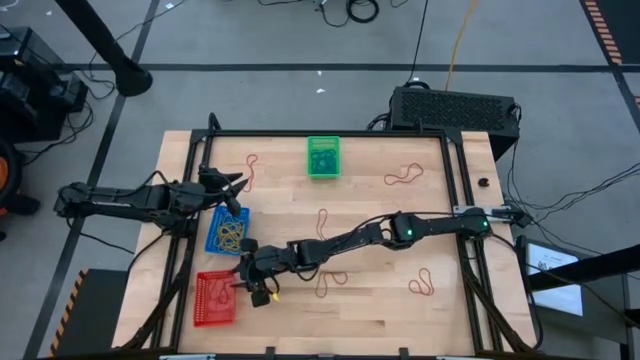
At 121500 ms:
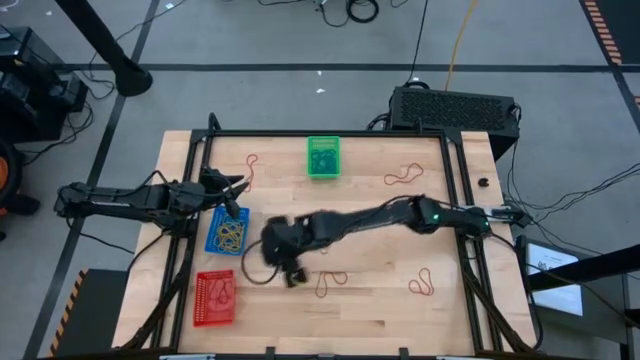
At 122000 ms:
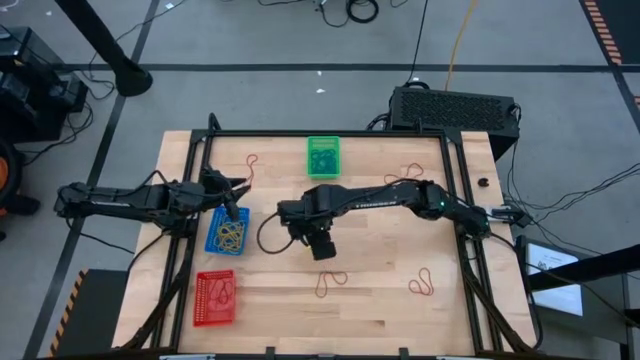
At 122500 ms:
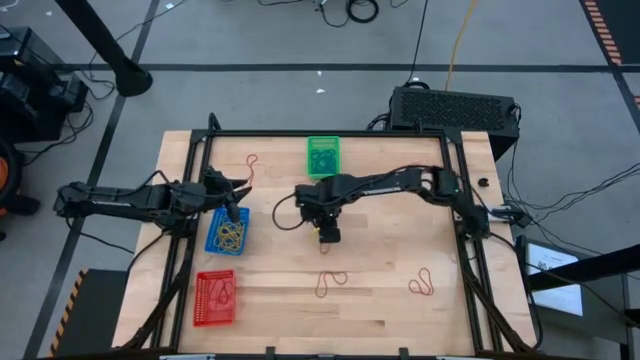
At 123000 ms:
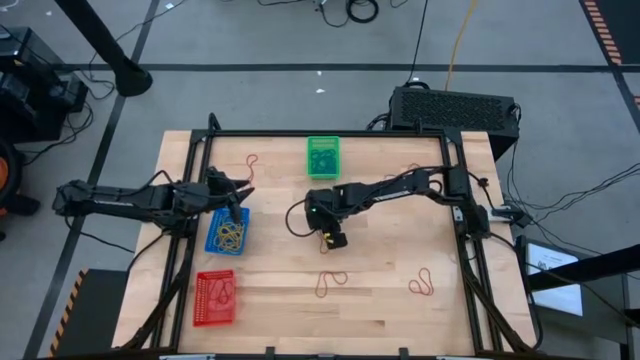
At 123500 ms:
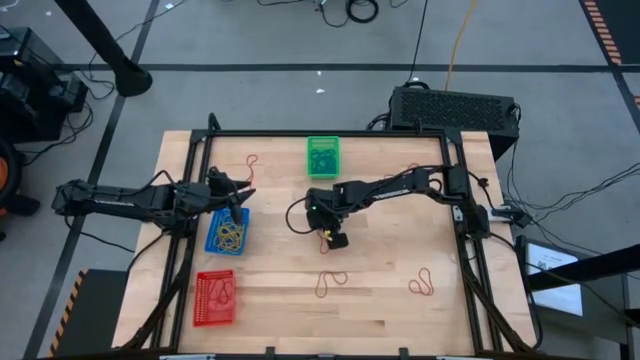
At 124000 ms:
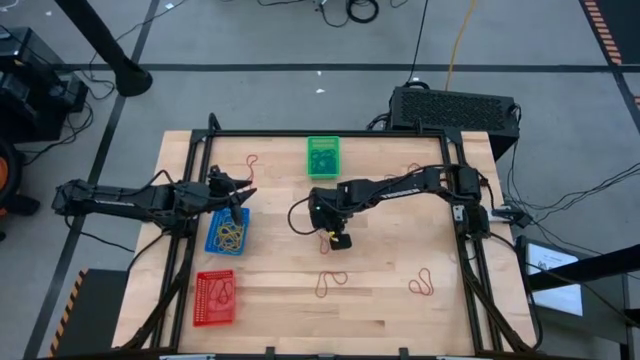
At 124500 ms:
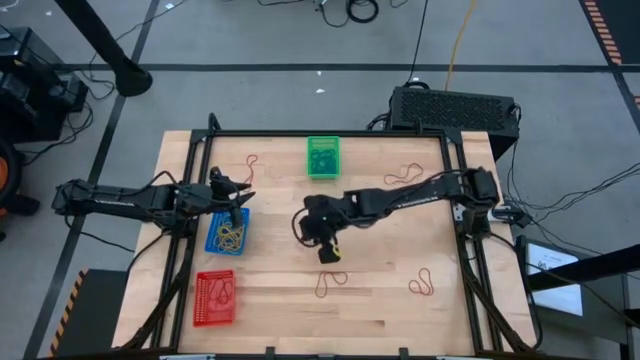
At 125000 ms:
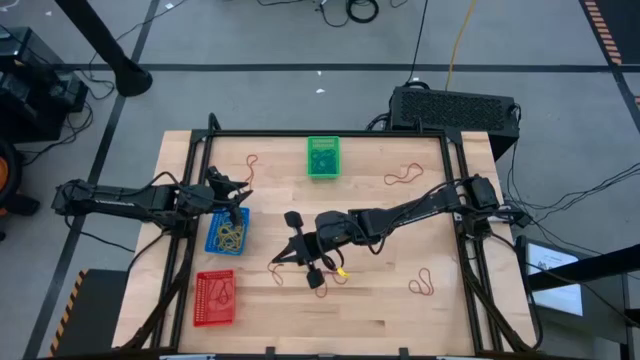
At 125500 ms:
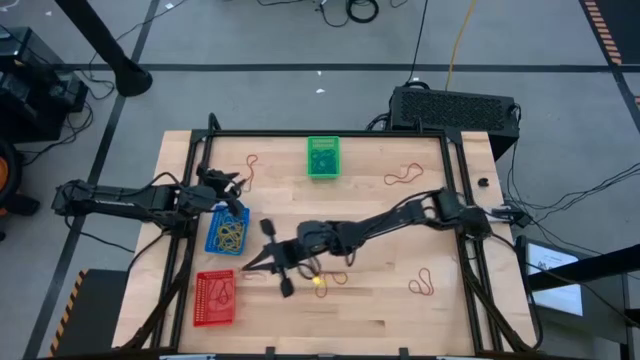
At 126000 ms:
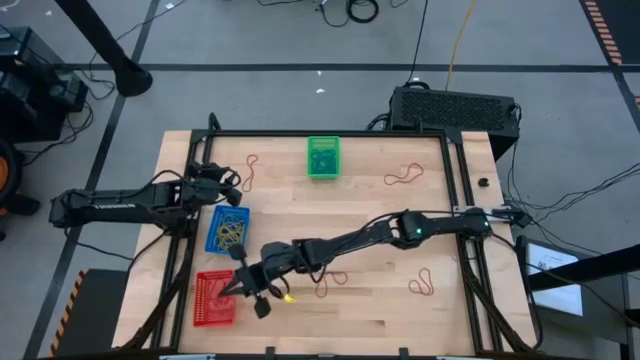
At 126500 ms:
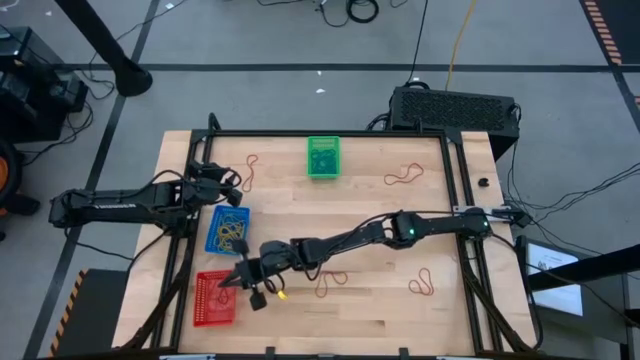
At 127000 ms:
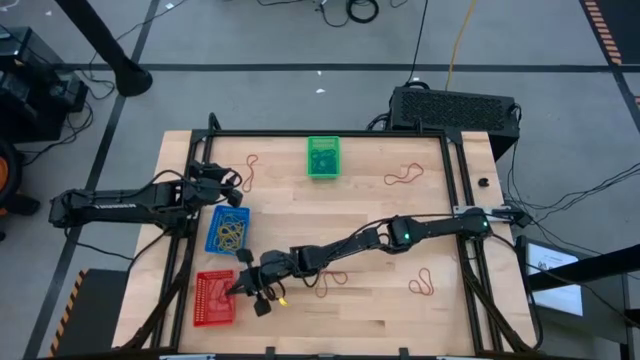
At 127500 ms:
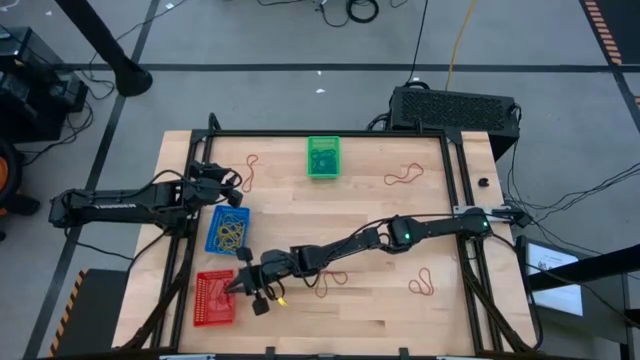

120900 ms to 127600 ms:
Task: Sort rubber bands into baskets
Put the red rubber band into the red bin

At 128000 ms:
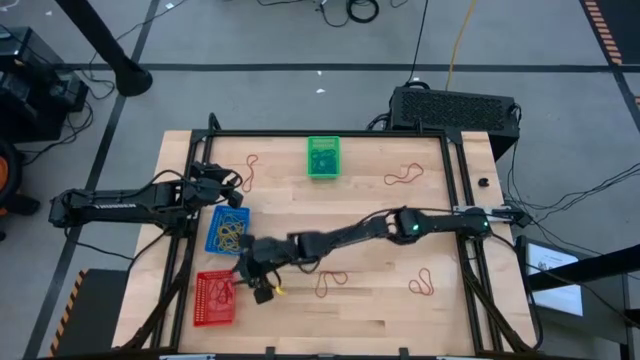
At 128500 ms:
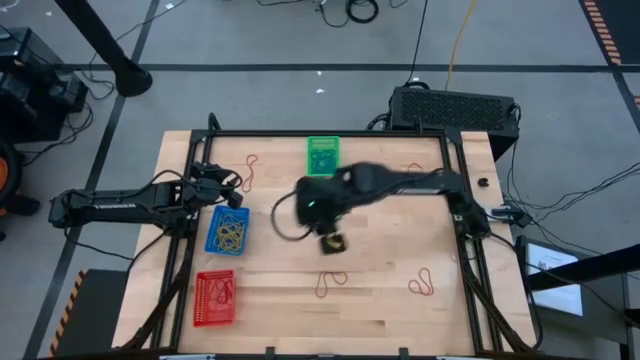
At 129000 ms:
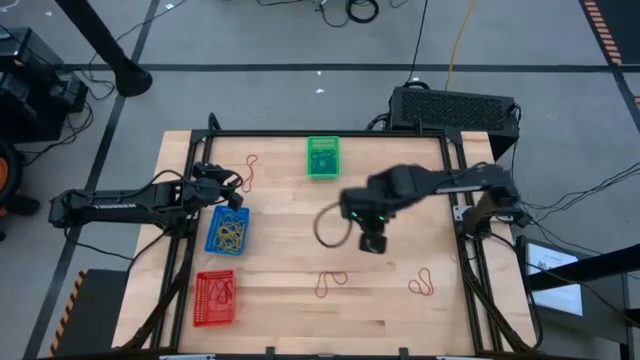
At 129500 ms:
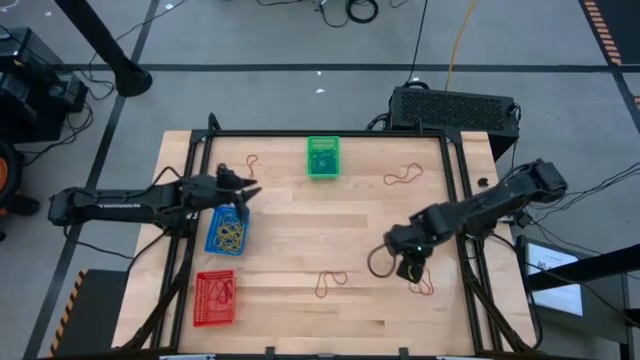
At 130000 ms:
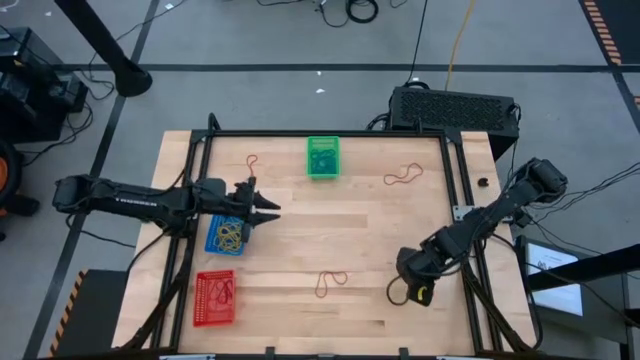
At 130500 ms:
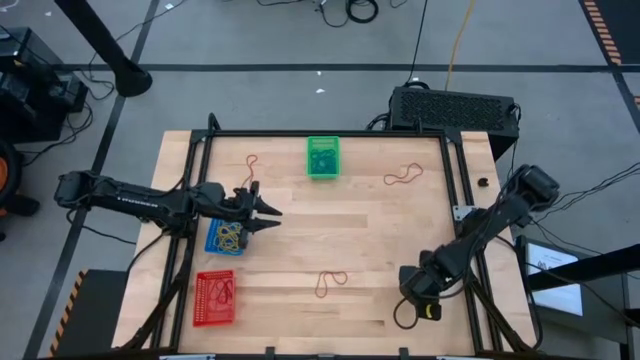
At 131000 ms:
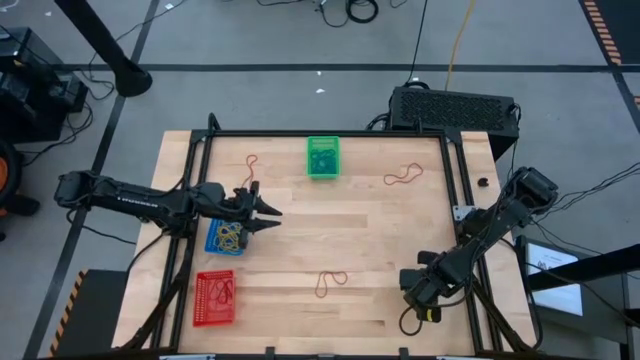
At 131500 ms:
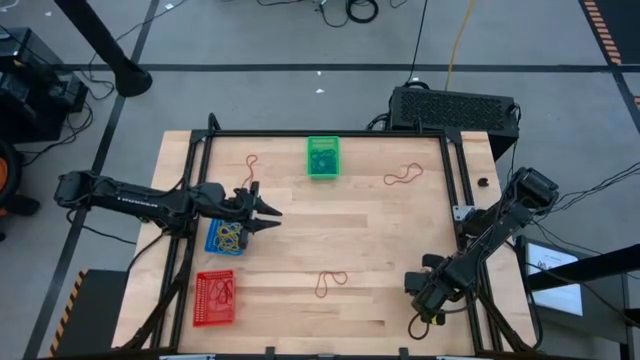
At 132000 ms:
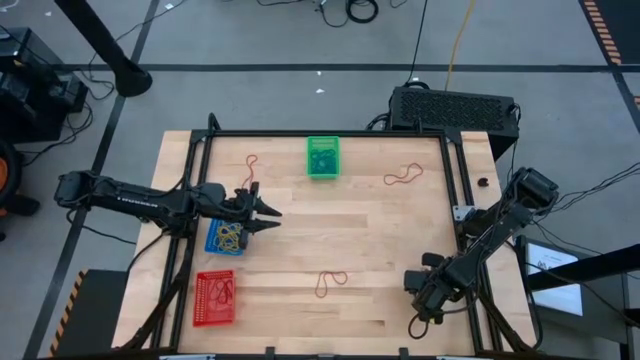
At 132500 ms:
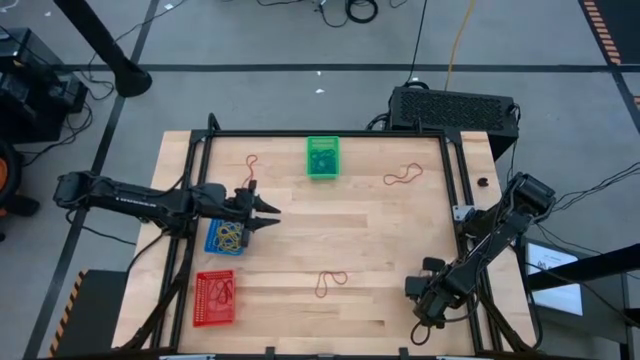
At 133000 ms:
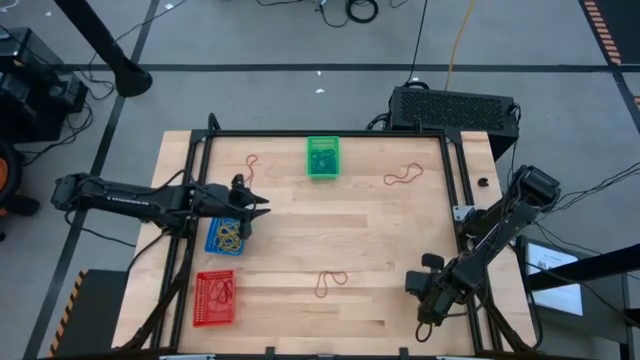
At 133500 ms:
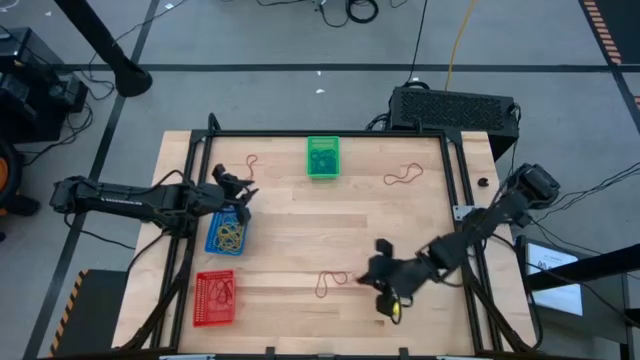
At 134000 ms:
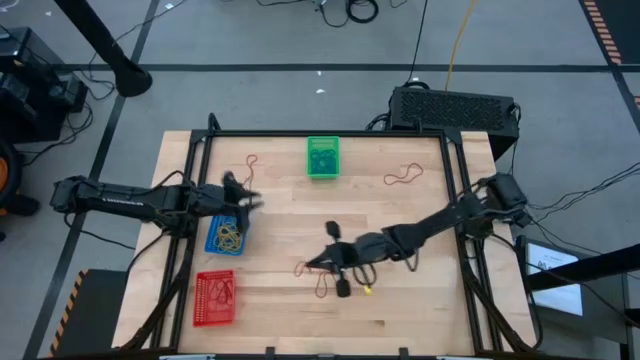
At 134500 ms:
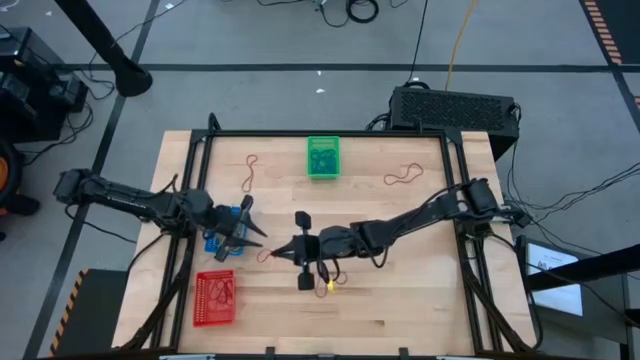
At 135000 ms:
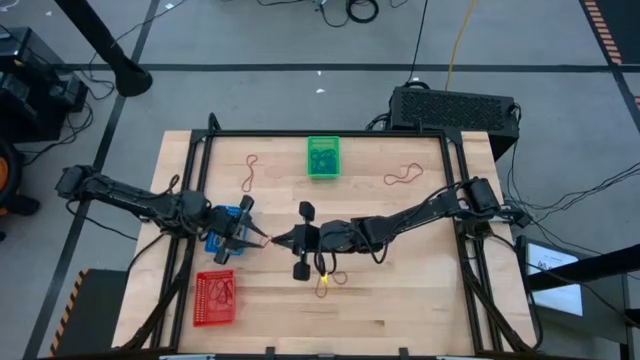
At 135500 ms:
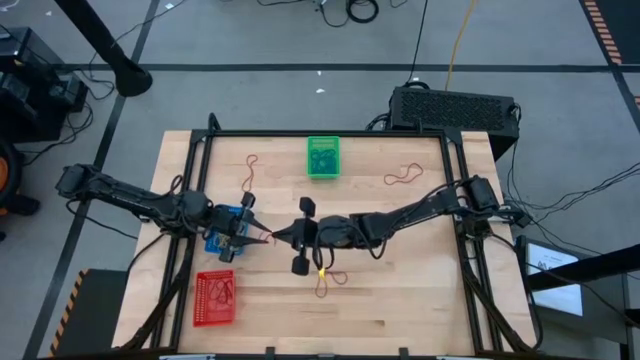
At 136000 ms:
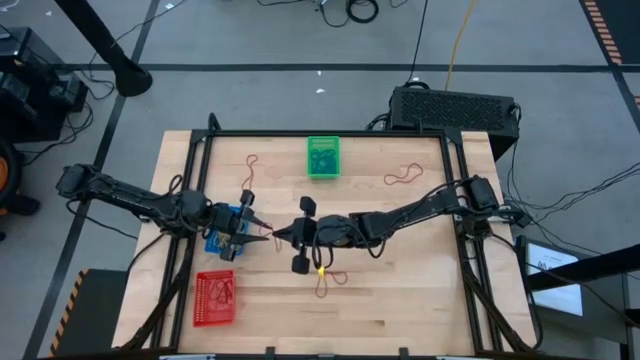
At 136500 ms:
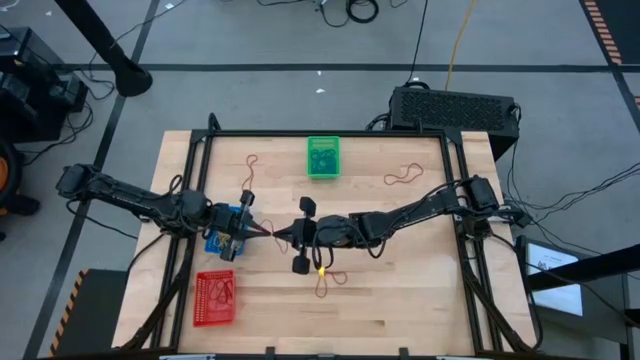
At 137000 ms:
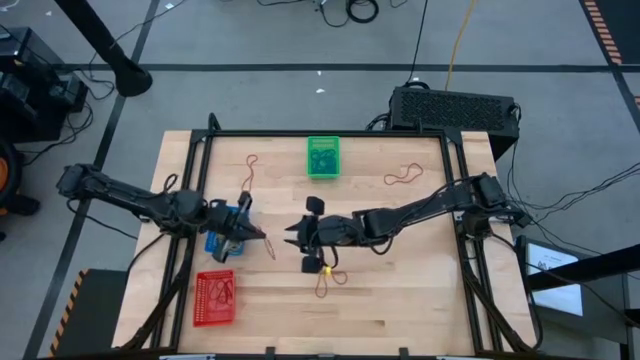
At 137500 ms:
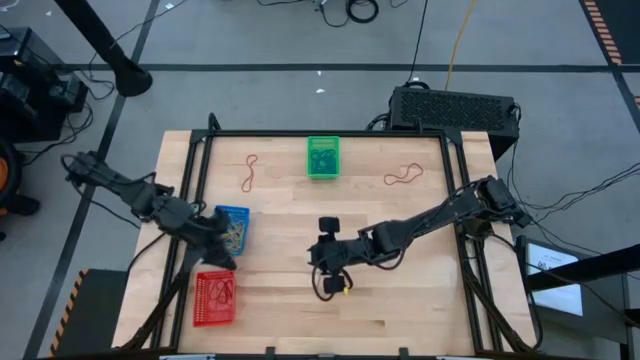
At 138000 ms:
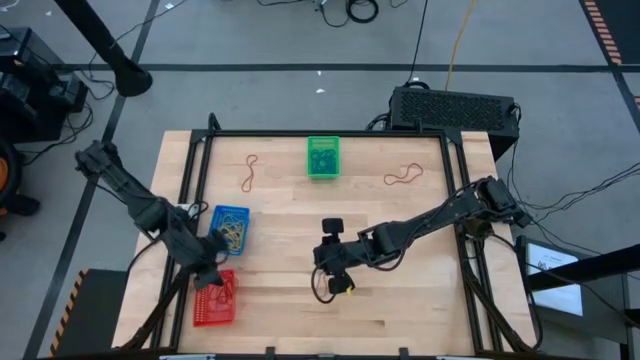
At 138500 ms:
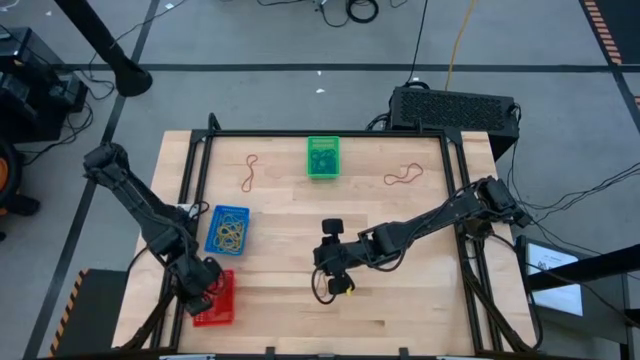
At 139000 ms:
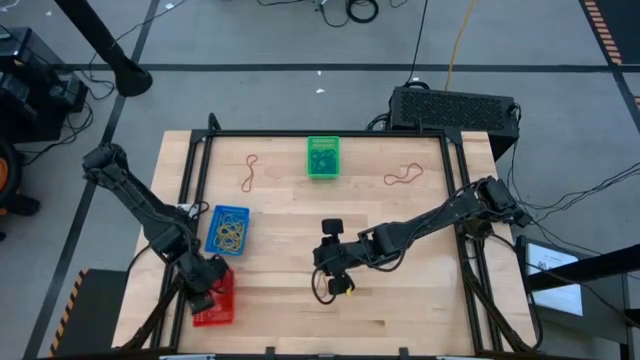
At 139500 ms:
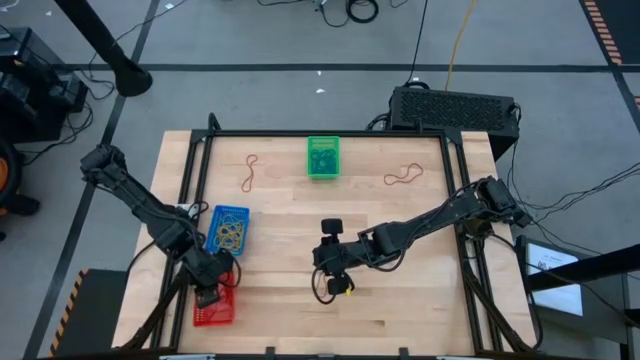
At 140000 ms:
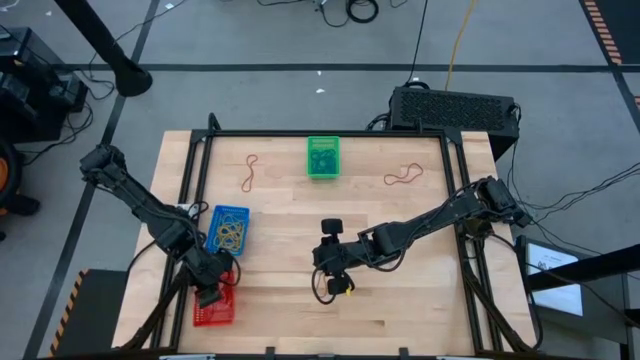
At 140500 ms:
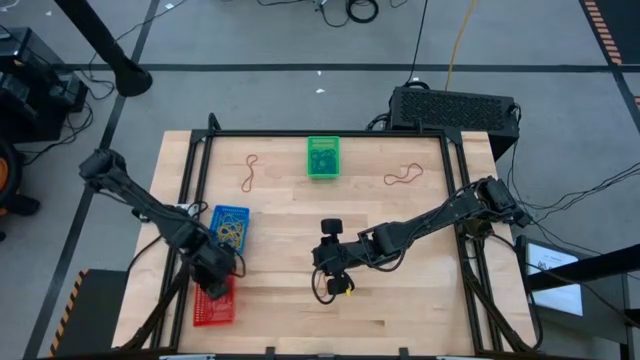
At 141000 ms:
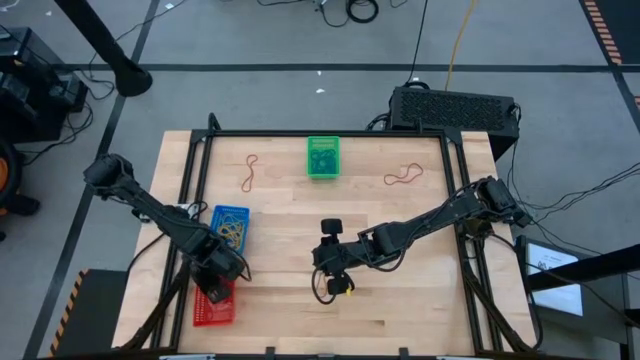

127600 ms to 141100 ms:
Put the red rubber band into the red bin

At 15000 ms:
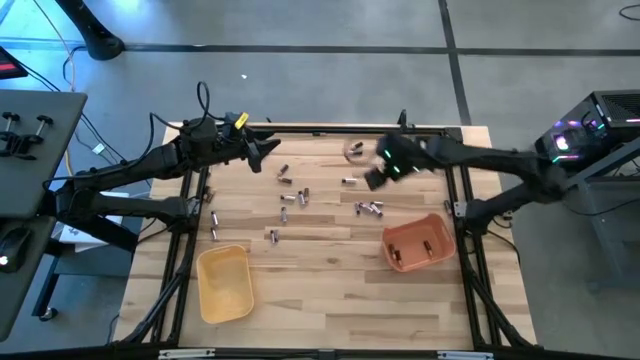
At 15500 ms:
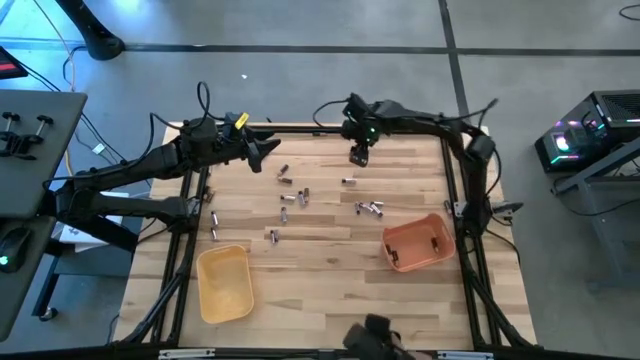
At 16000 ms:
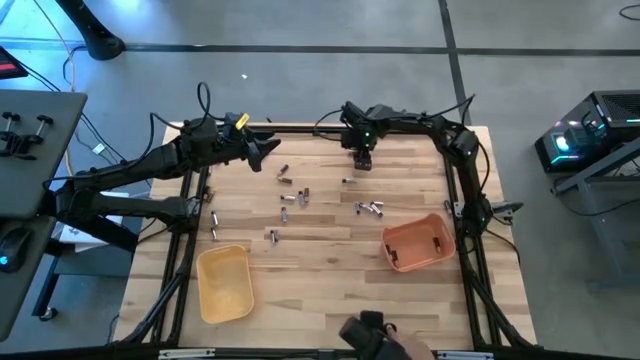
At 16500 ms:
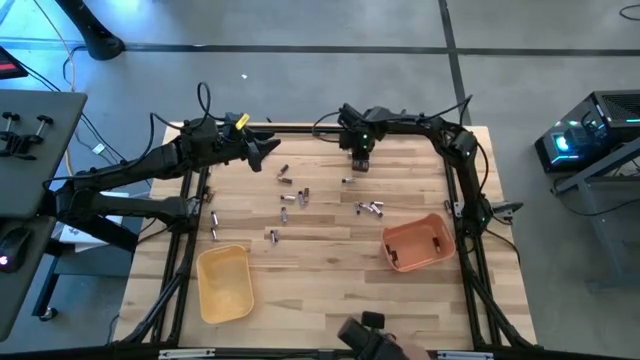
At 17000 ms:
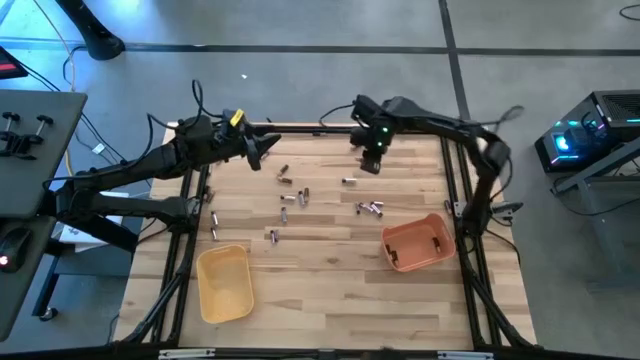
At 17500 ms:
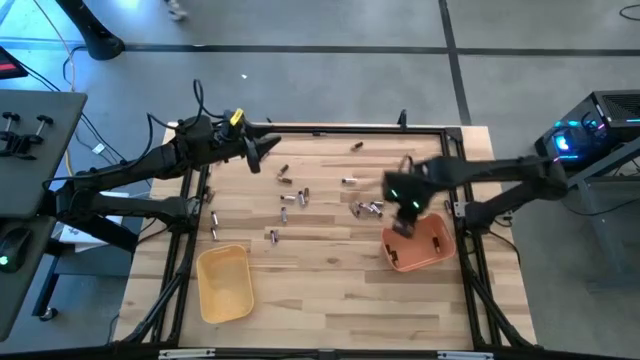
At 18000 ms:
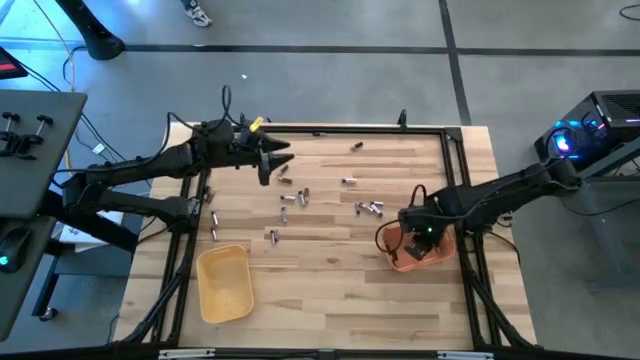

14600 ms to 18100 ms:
Task: Sort batteries
Put the black battery into the orange bin
